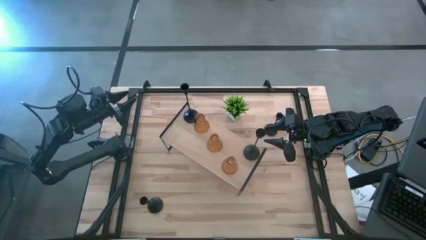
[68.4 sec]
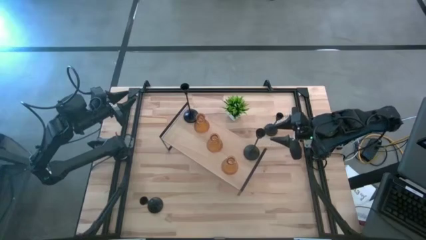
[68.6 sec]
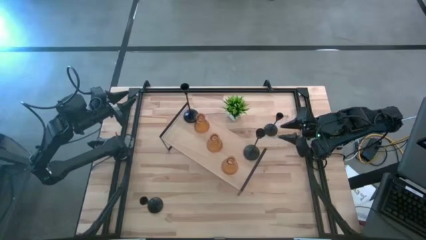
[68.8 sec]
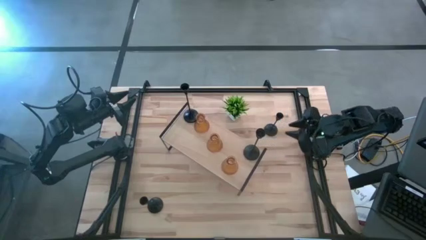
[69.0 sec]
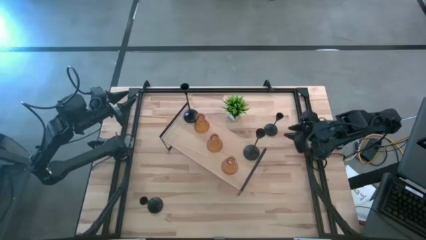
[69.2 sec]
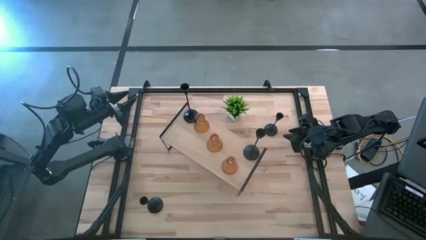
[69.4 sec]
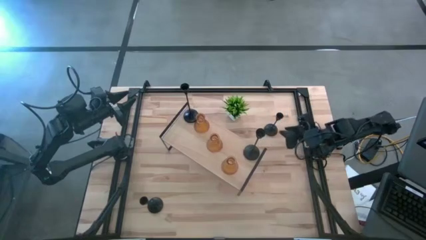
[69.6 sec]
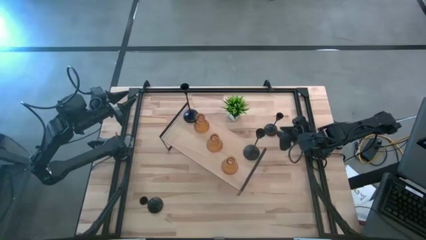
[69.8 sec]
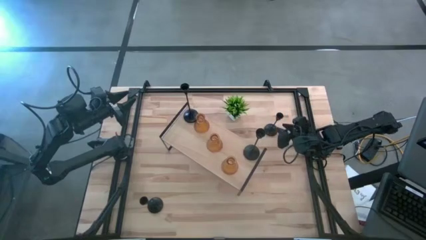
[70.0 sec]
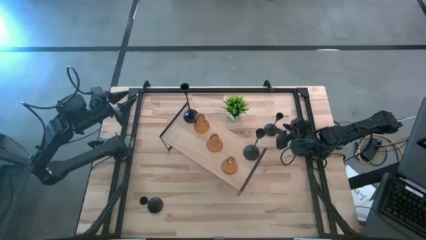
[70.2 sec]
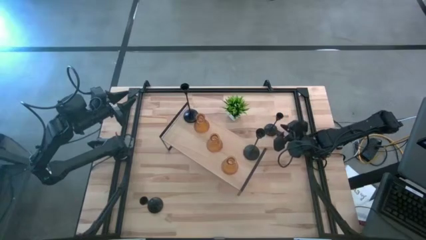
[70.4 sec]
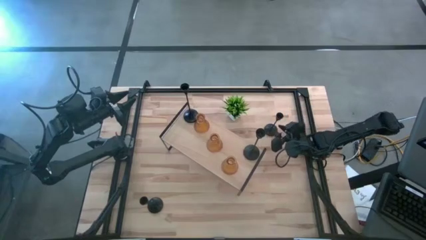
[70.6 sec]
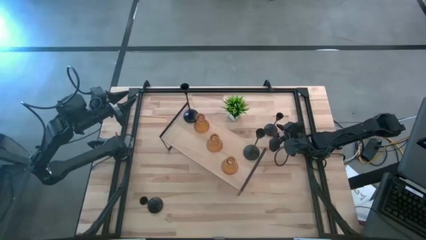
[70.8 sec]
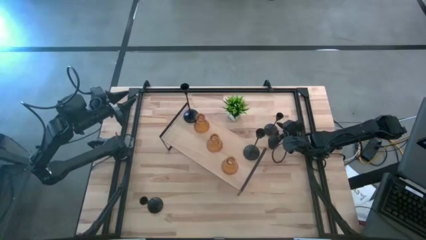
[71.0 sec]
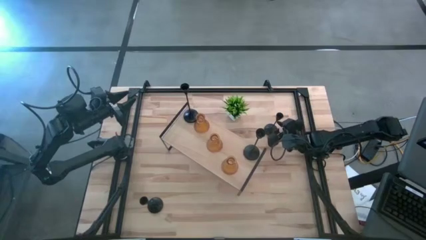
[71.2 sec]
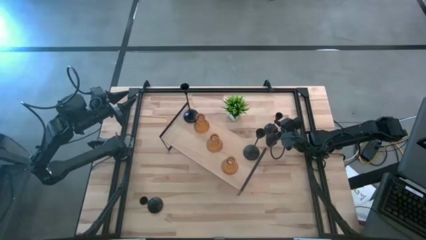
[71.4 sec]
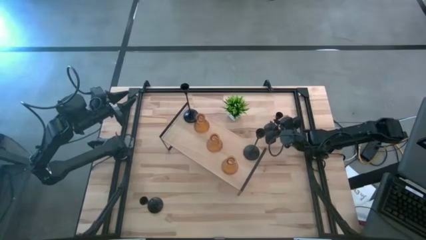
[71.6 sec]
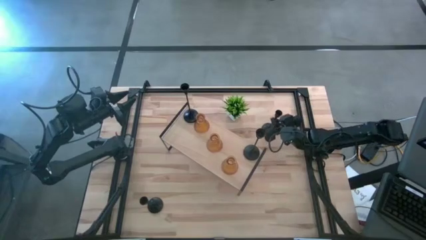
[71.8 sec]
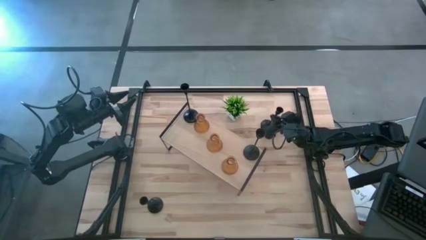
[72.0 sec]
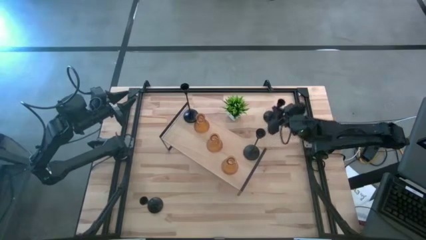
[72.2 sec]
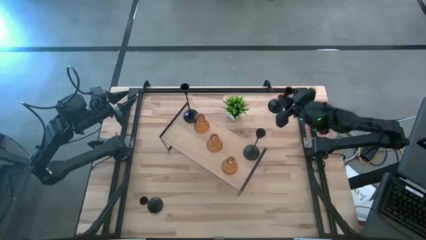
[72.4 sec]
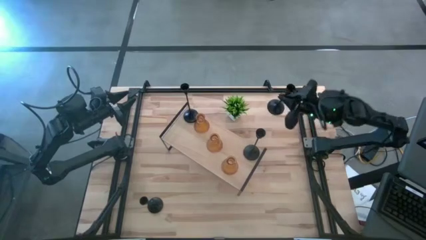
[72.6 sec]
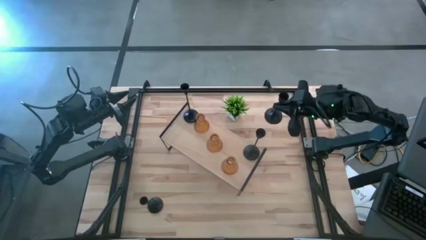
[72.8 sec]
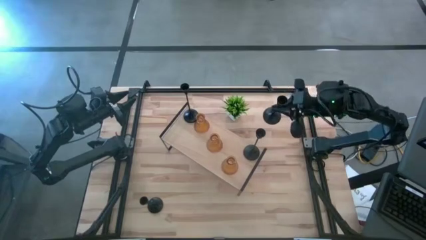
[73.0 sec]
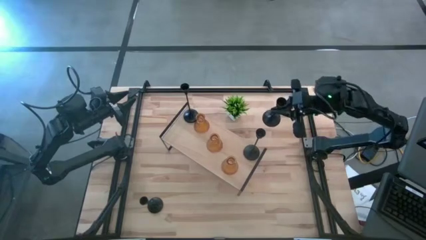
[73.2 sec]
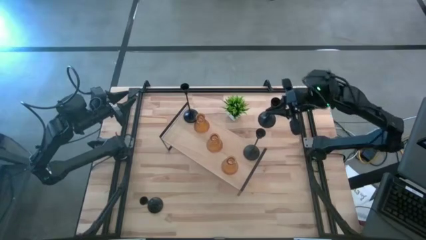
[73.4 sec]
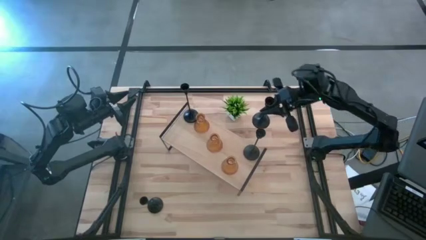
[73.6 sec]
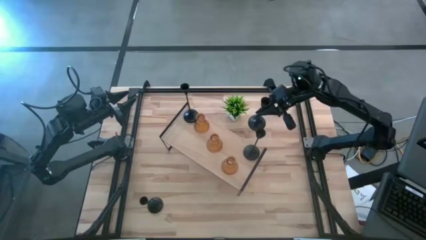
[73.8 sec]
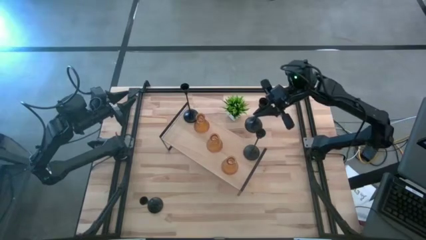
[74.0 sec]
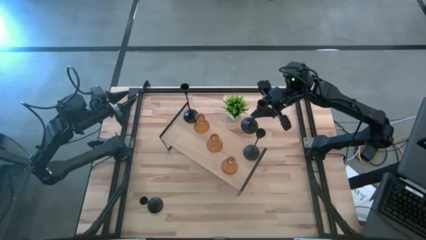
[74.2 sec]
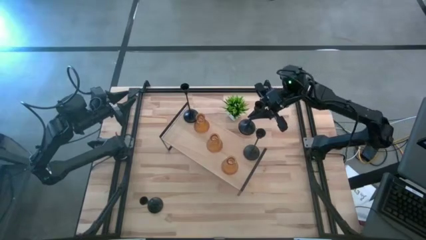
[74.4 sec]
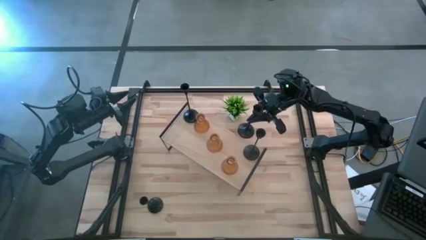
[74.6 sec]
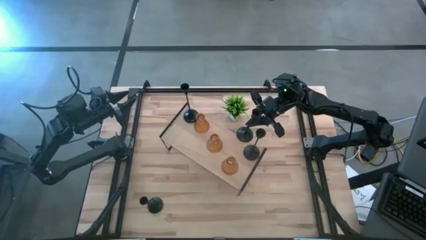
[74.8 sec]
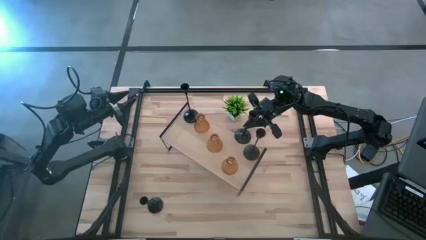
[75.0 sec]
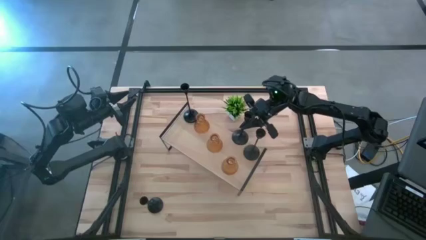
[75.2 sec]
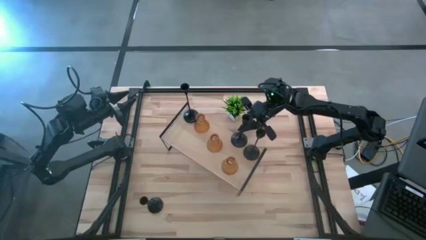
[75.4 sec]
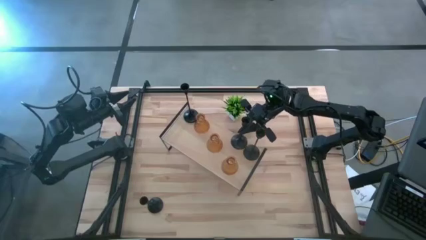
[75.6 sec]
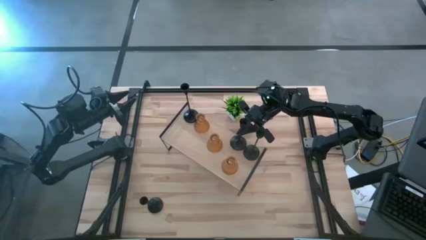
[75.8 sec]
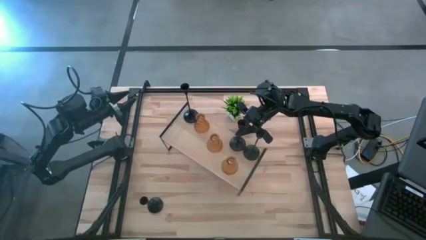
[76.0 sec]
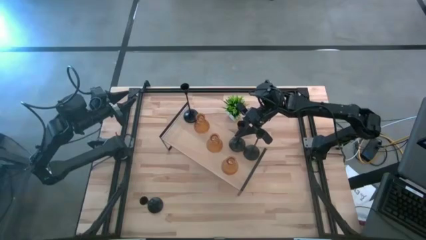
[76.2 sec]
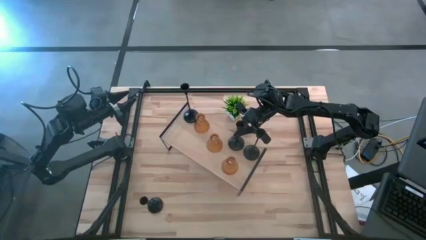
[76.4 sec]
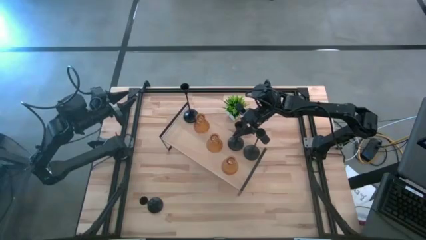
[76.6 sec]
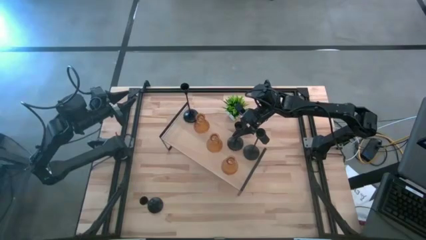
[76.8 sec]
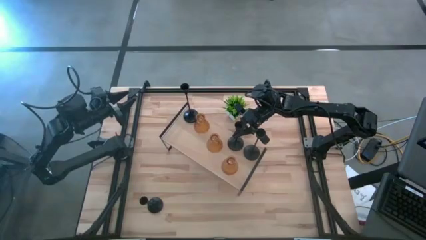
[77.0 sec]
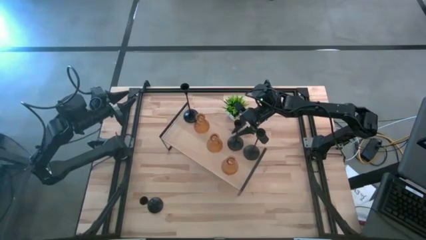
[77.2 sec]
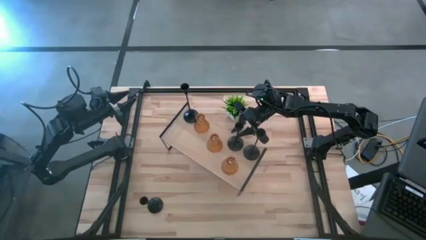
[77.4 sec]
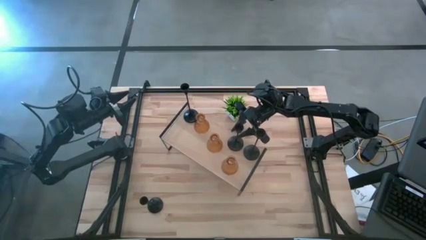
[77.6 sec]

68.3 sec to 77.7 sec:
Task: Pick & Place candle stick holders
Put the black candle holder on the shelf
